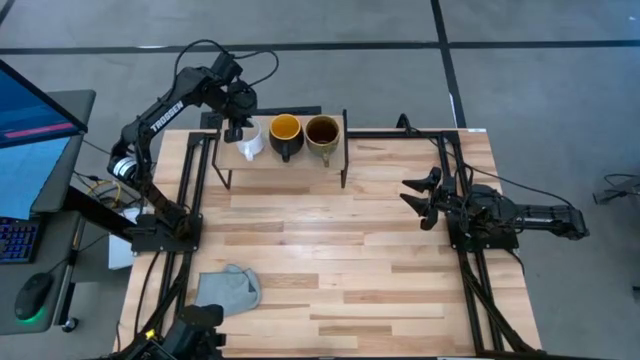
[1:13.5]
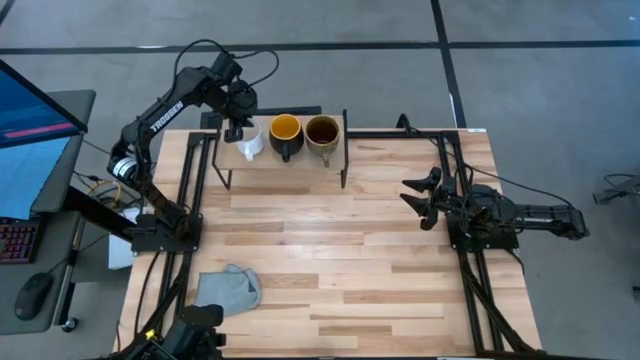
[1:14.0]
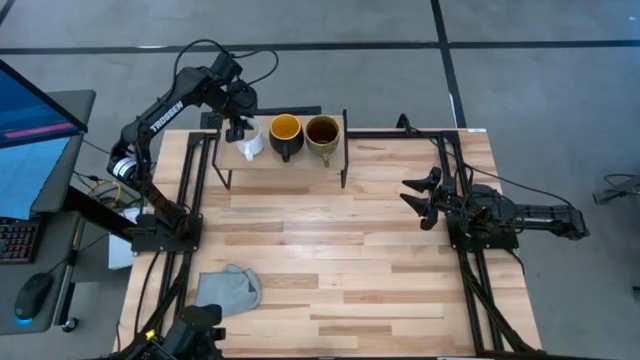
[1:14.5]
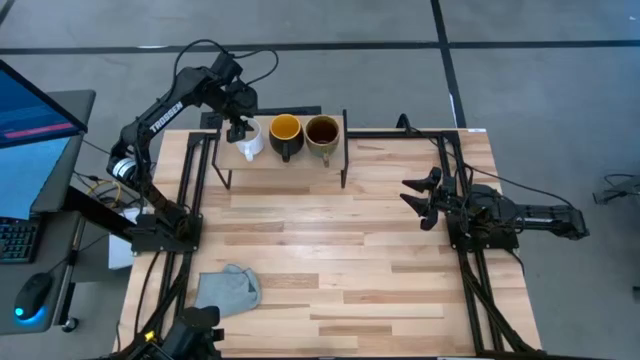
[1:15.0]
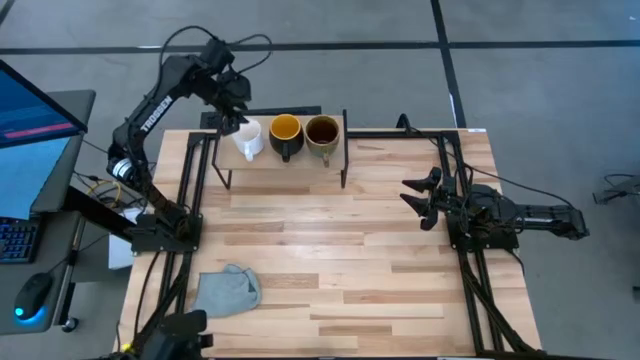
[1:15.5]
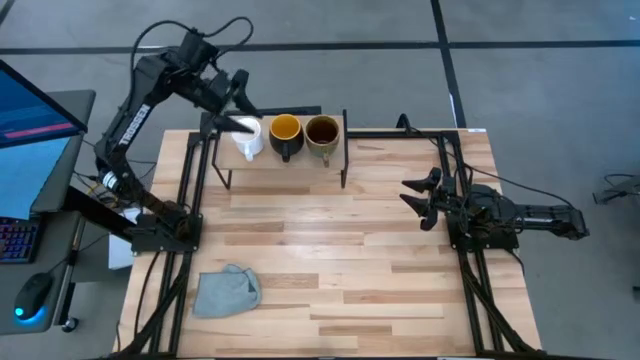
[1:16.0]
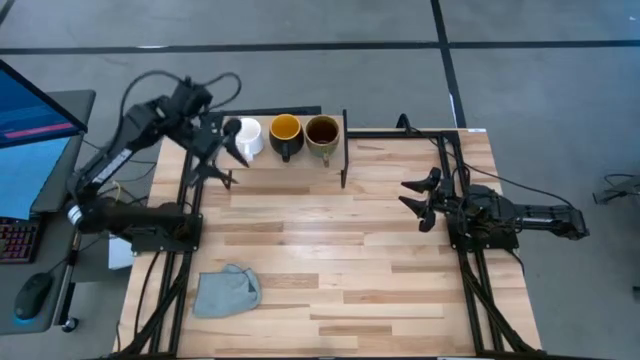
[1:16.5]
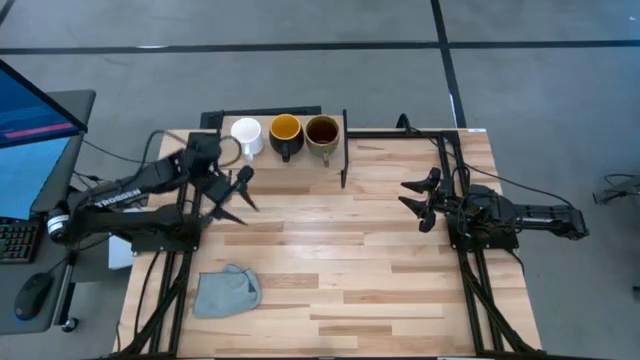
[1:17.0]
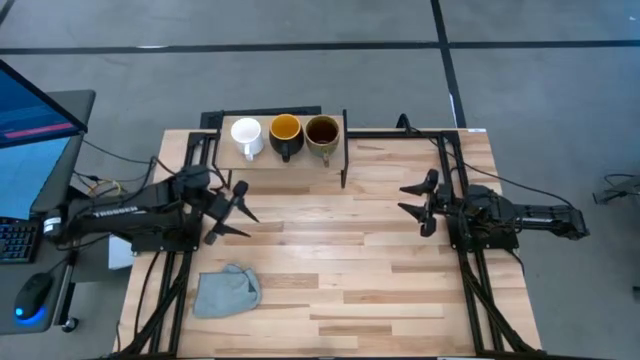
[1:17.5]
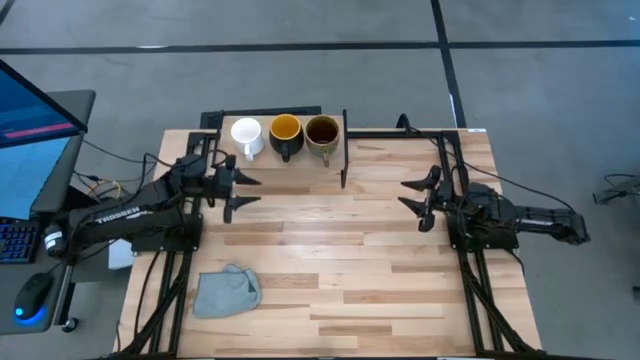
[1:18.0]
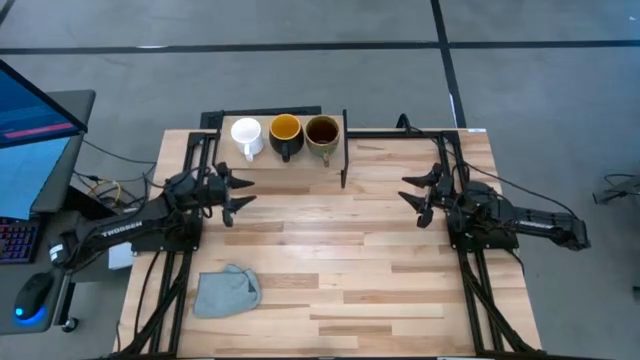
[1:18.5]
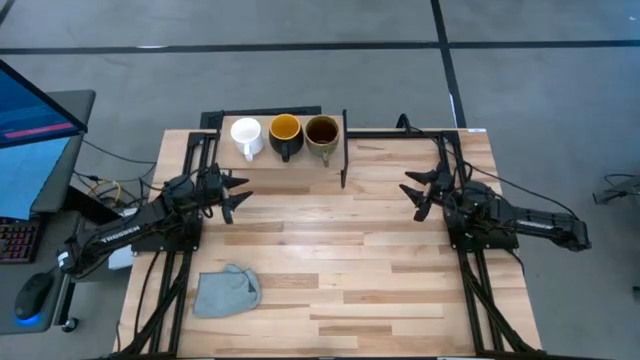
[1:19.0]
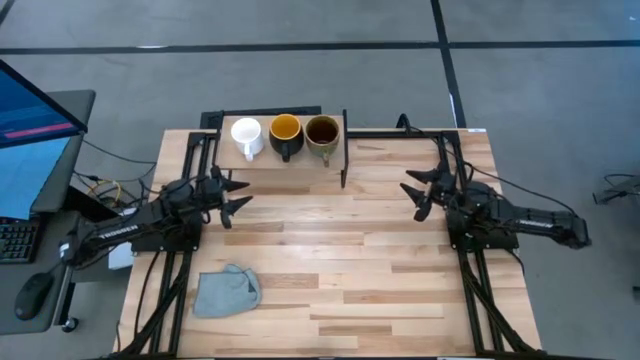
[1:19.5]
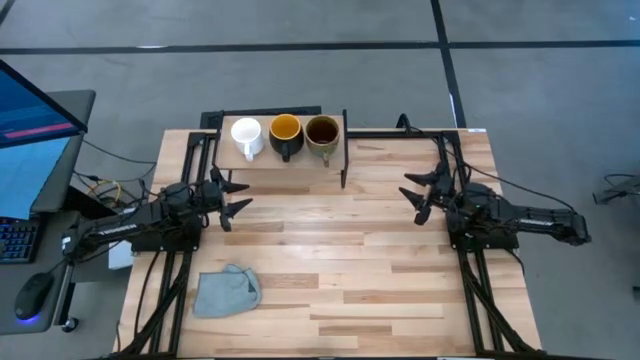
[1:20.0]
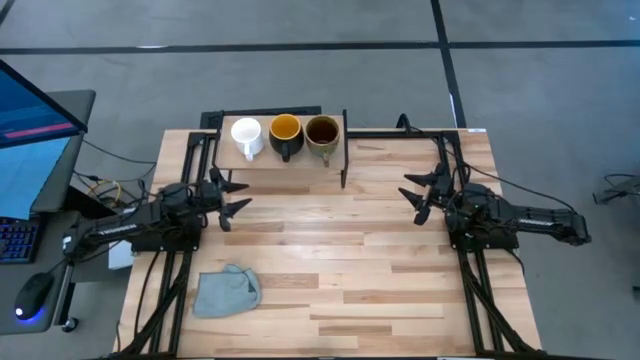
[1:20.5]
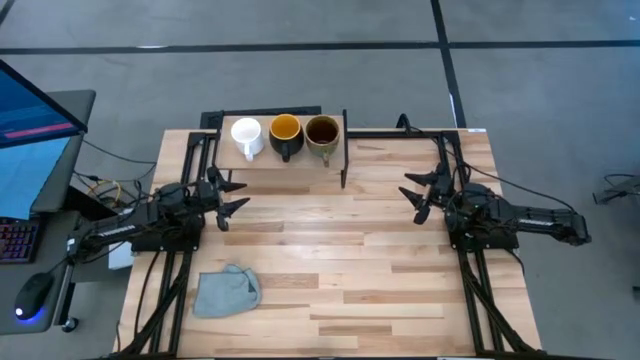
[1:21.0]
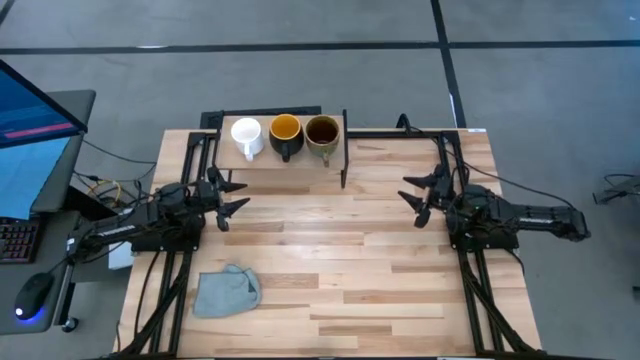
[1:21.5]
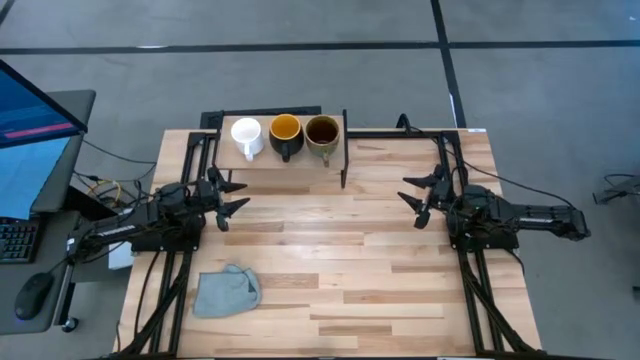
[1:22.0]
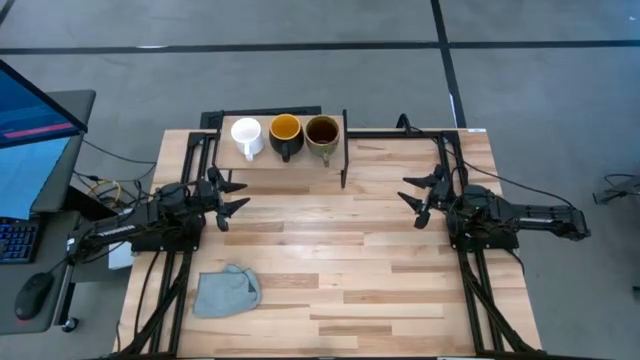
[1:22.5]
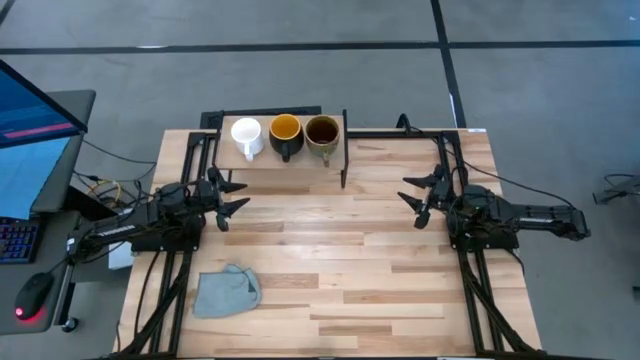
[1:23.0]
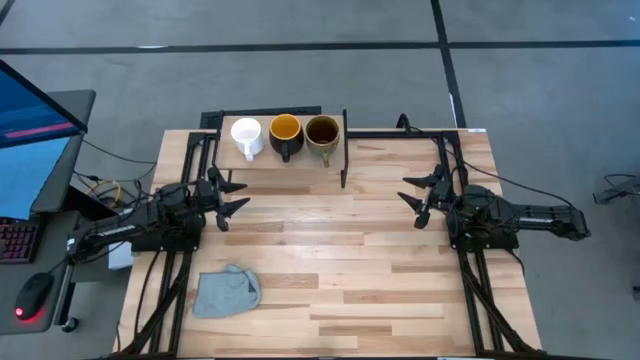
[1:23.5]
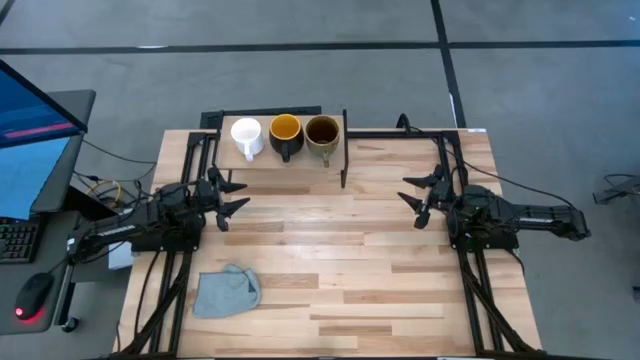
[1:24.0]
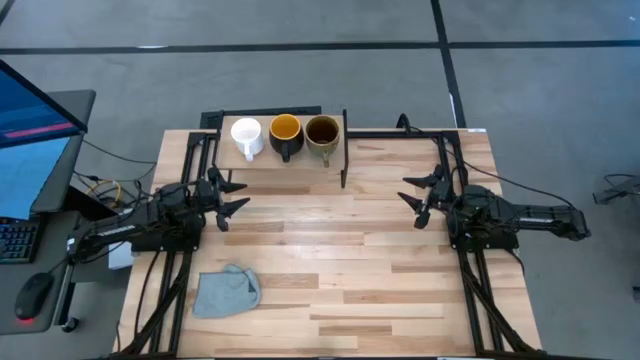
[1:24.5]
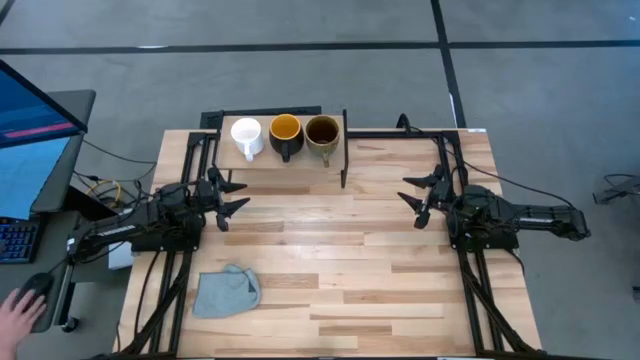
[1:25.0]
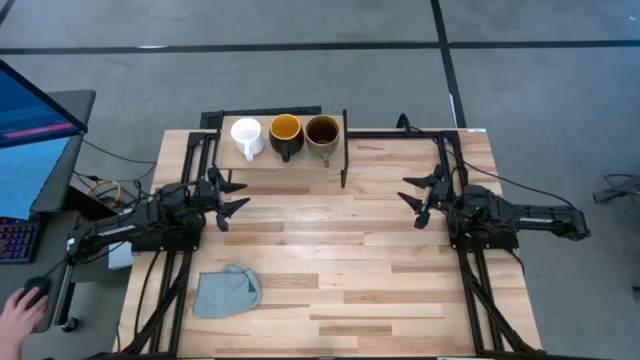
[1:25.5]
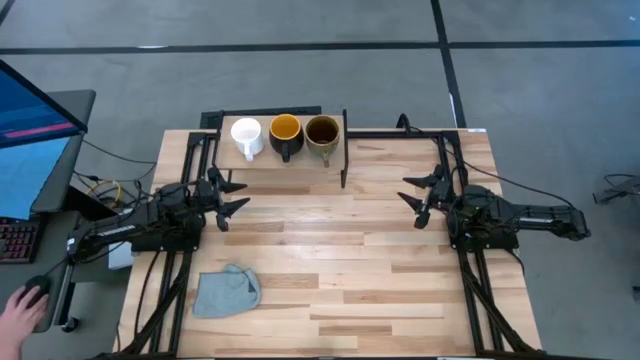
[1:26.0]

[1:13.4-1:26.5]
Task: Stack small to large cups/mugs on shelf
Return to Home Position

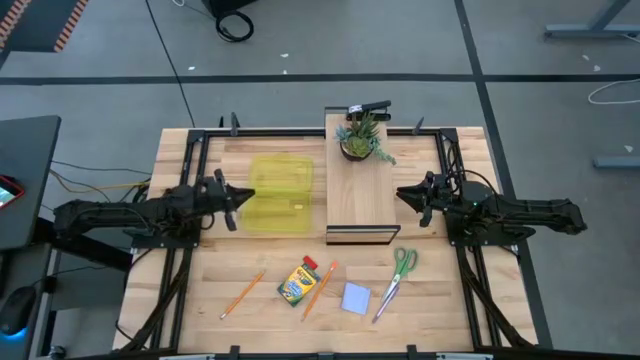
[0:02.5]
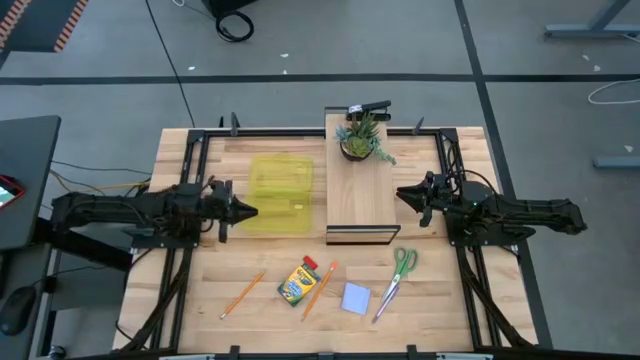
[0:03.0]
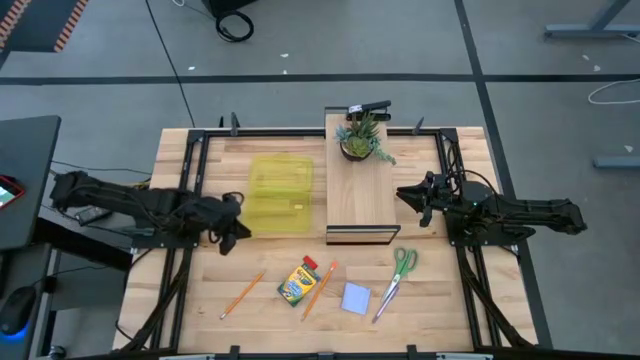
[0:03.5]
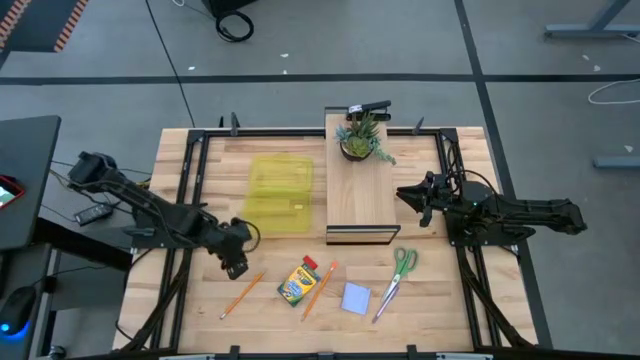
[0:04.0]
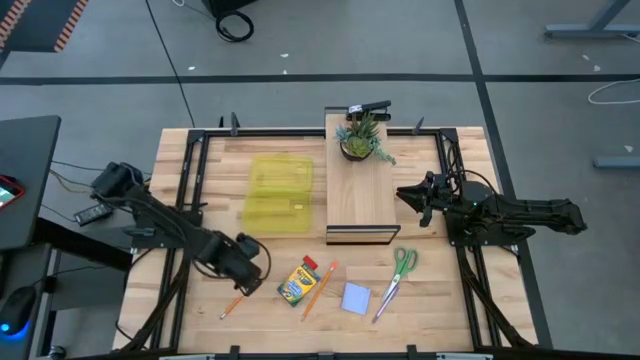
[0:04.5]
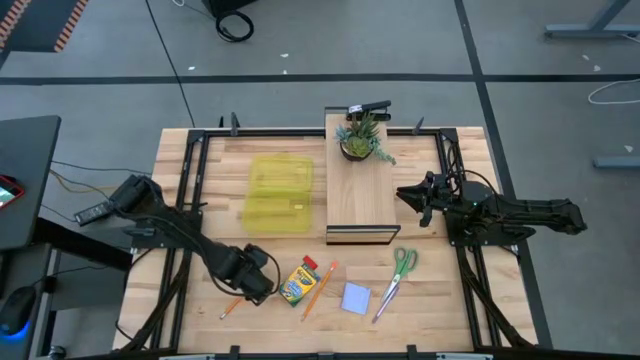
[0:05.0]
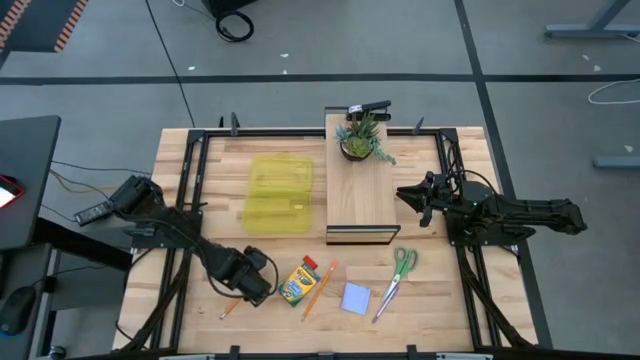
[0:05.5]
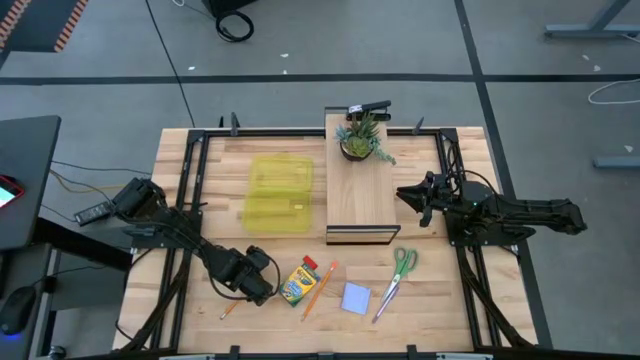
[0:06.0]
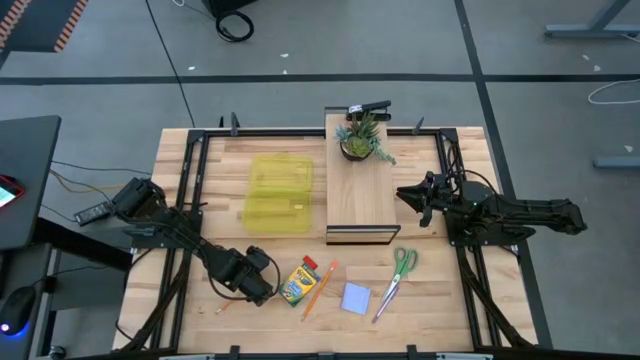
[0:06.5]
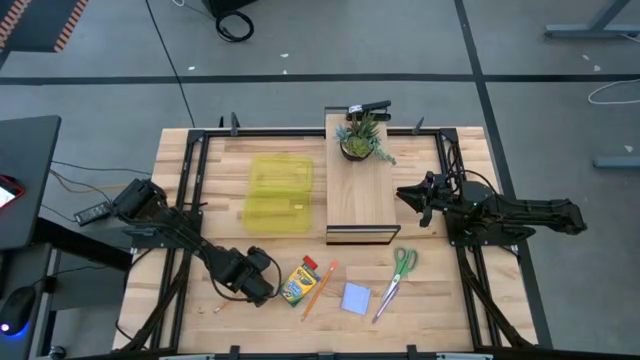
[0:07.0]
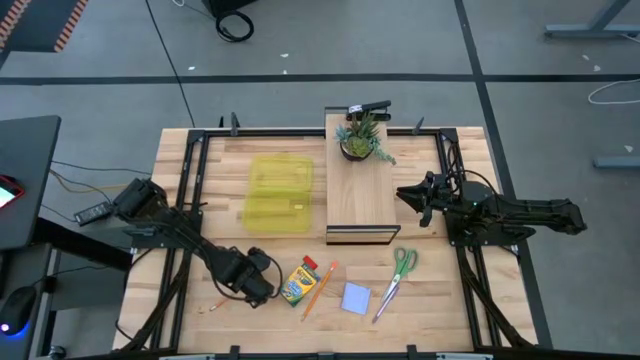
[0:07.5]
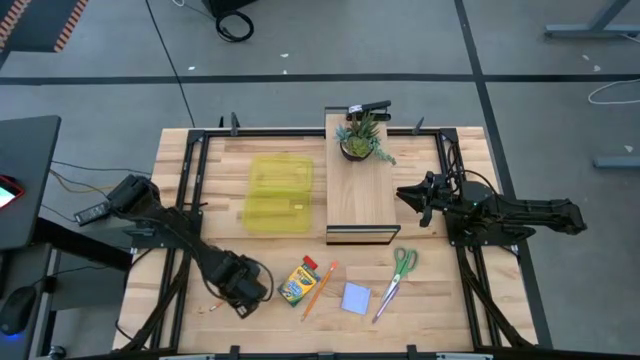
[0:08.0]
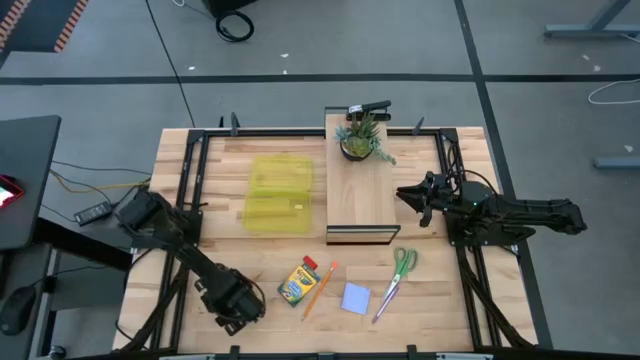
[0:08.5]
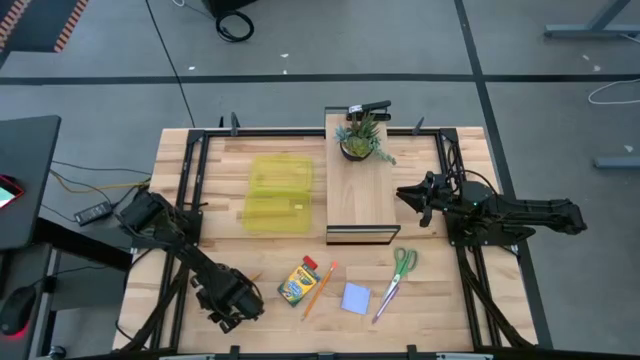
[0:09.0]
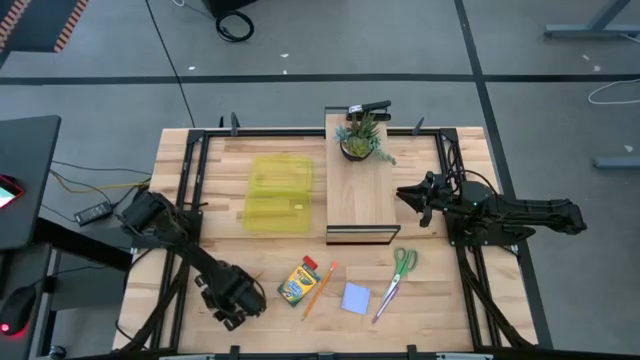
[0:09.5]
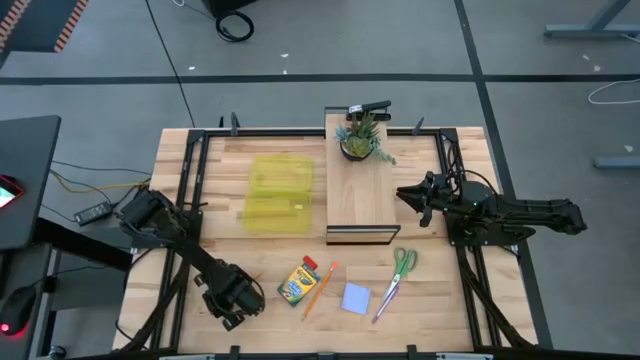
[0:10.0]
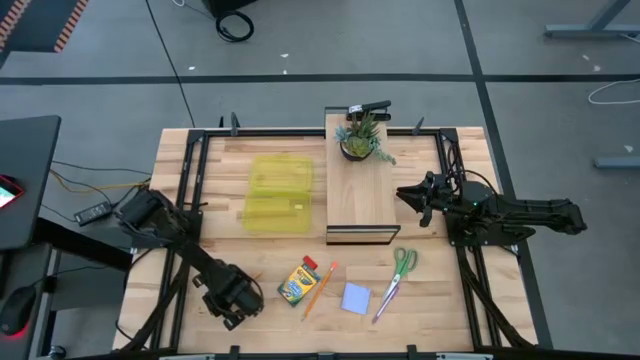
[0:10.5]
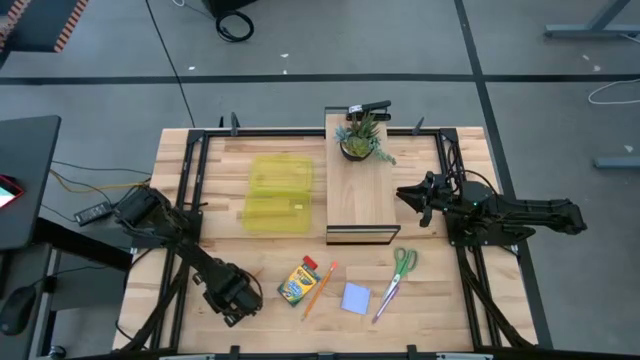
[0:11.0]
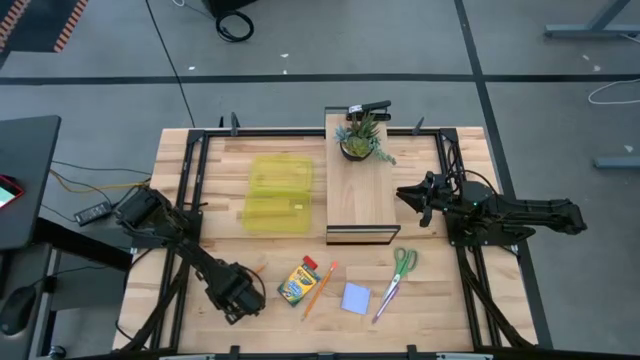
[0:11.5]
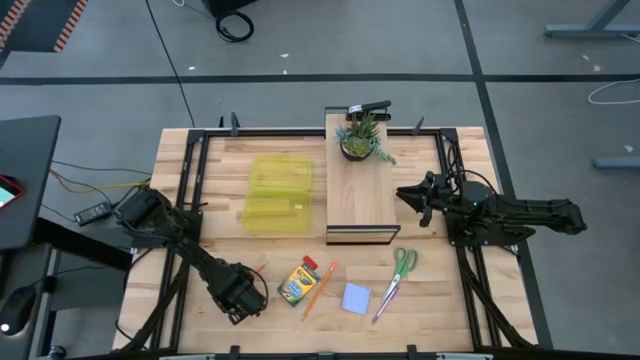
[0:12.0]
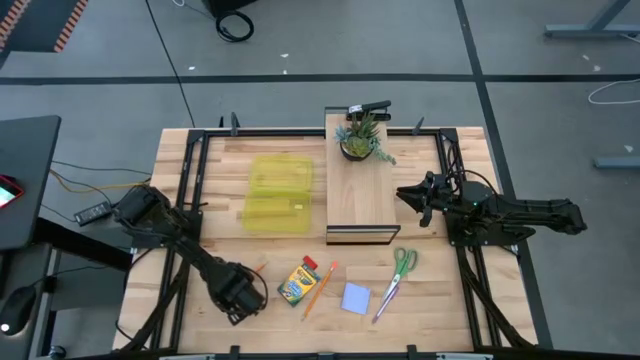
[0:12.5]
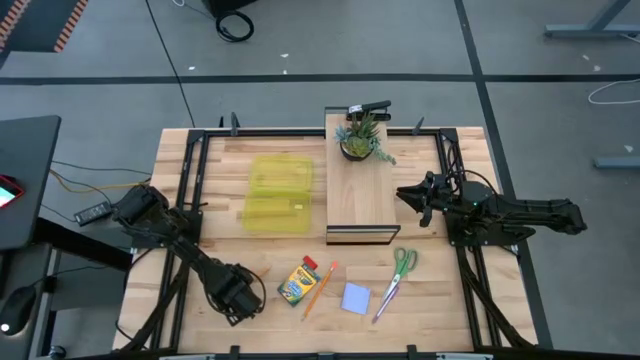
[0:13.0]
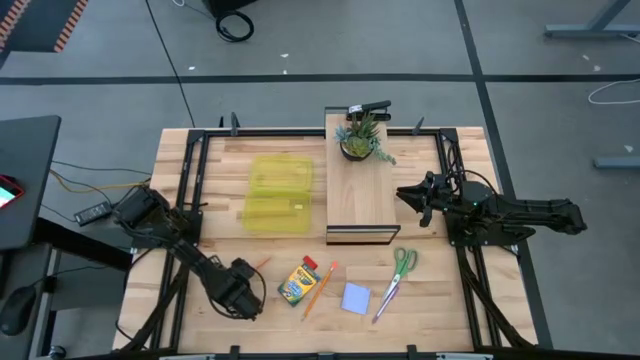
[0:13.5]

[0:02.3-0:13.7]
Task: Pack school essentials
Put the left pencil into the supply box
